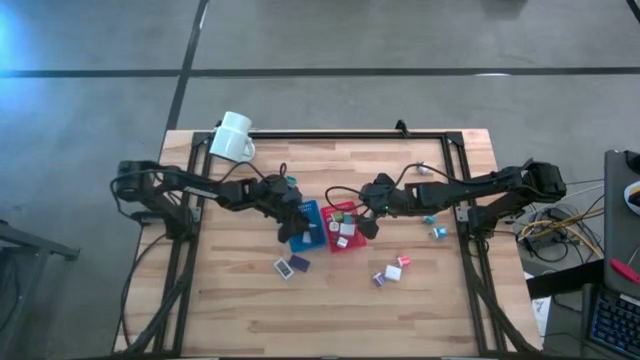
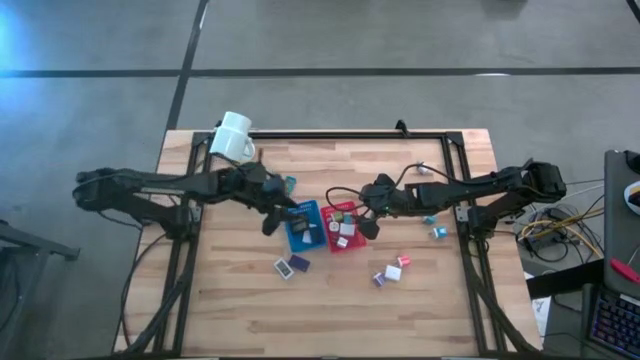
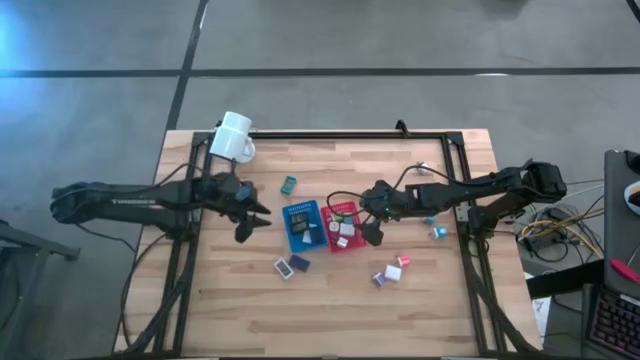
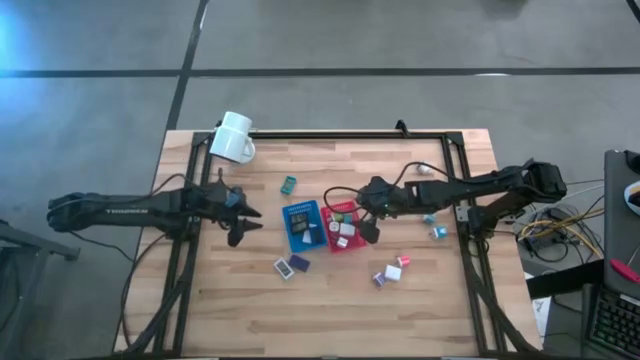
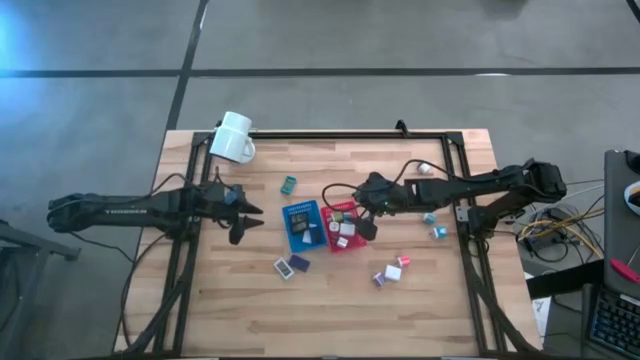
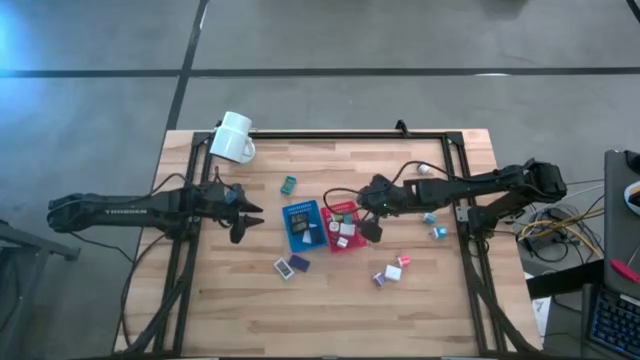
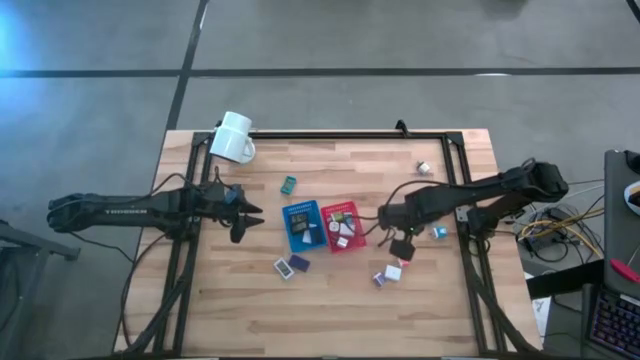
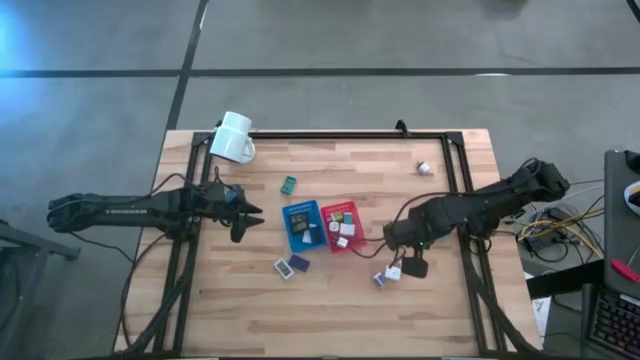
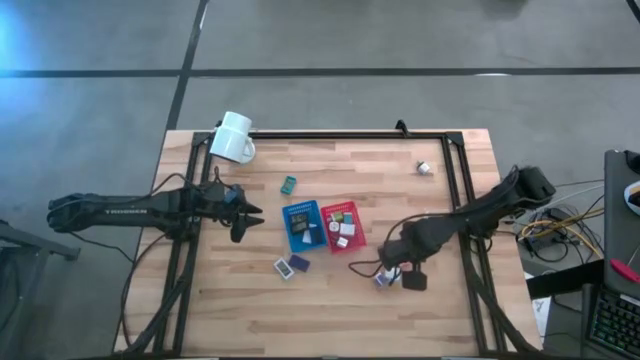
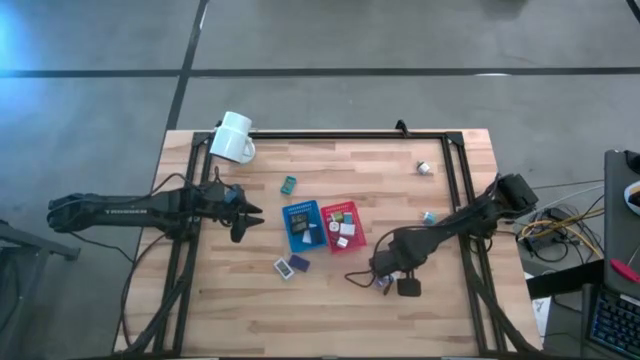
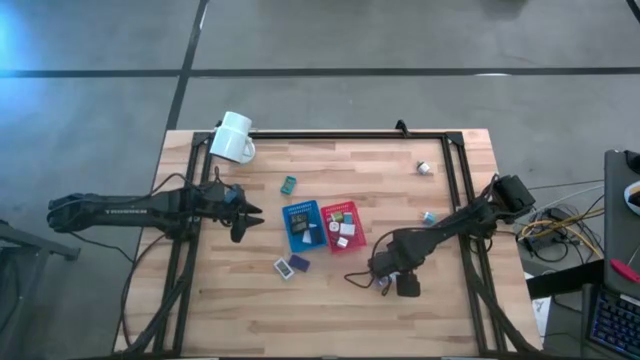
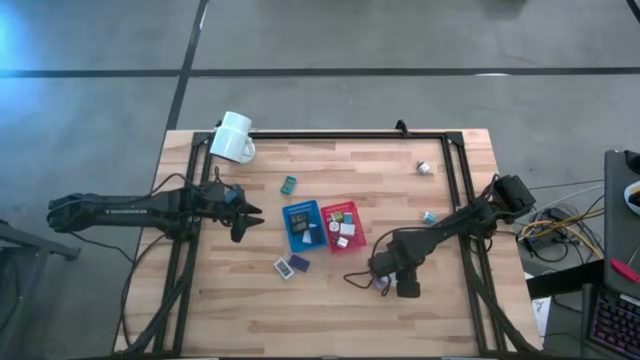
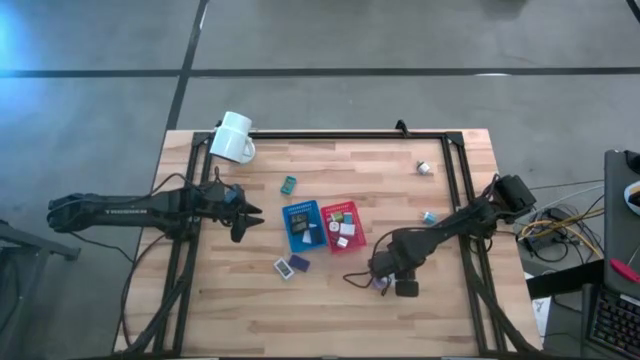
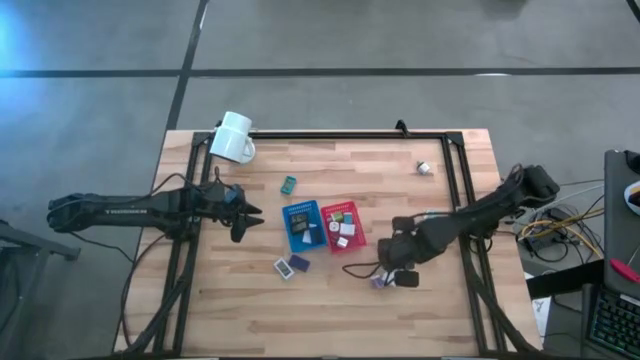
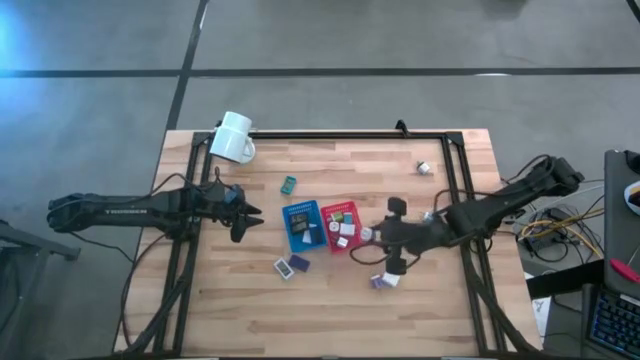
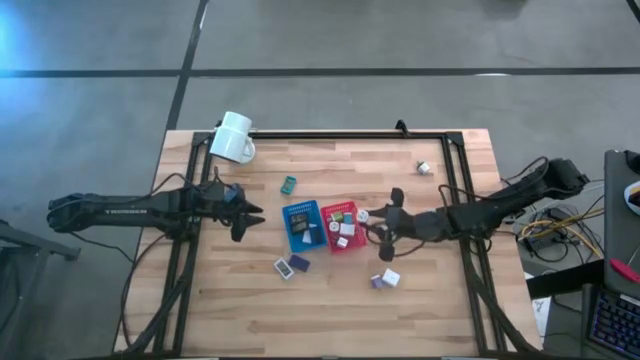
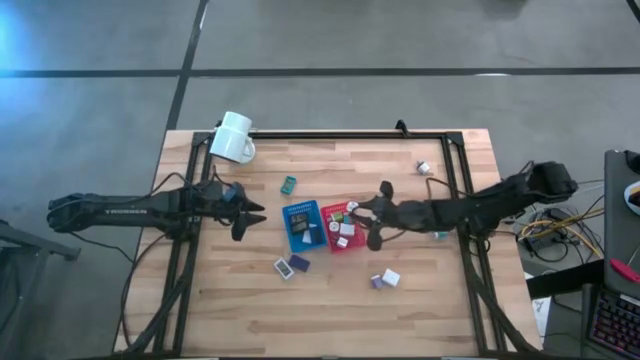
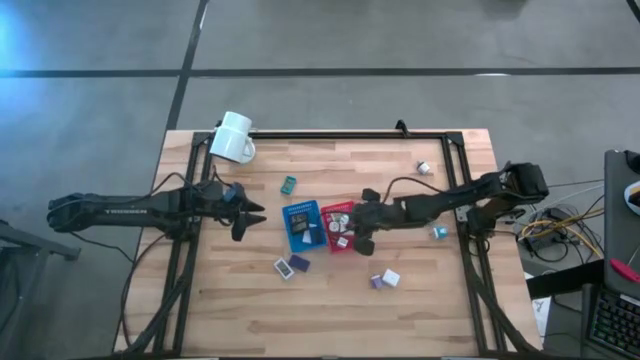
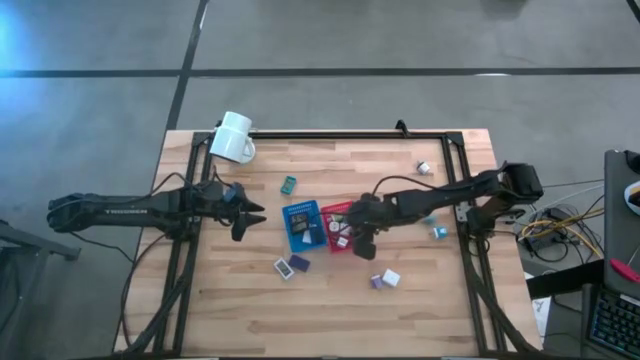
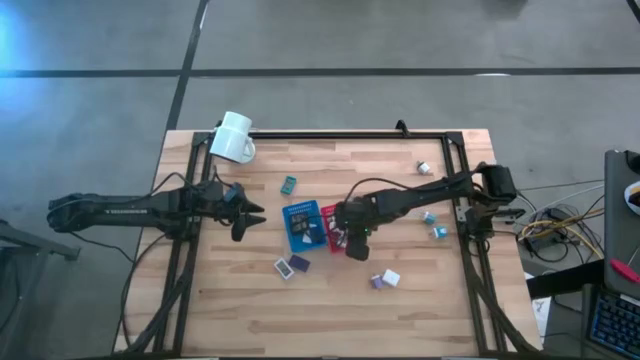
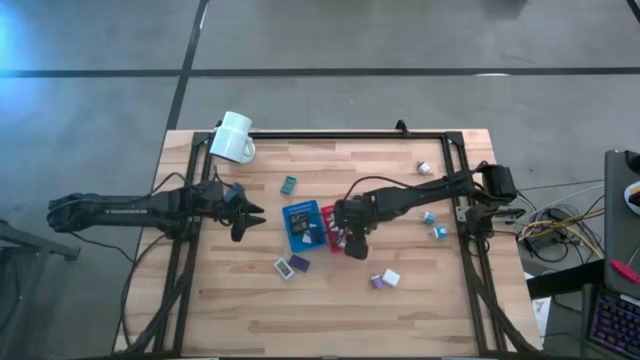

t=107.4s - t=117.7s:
Task: Pick & Place Office items
Put the pink charger adapter into the red bin

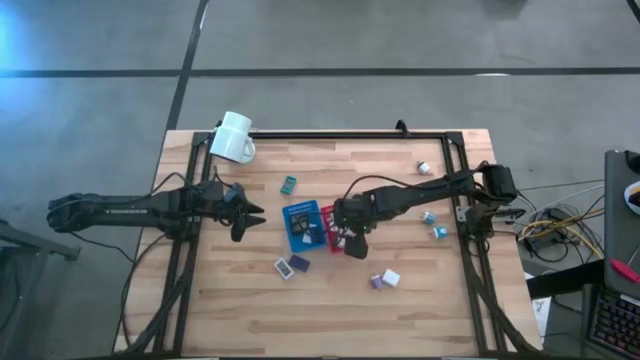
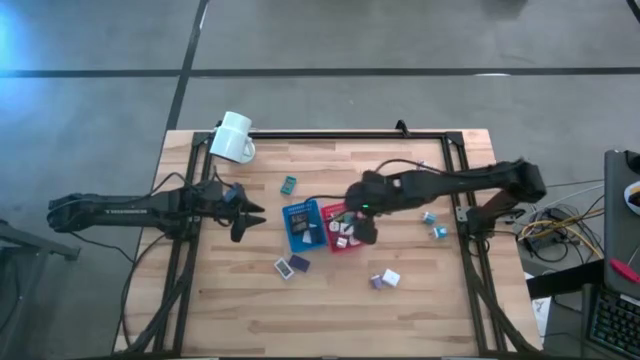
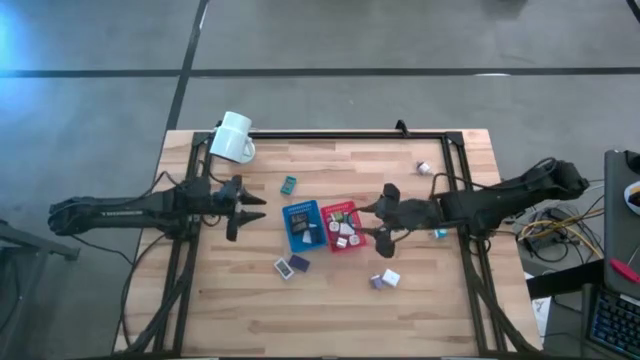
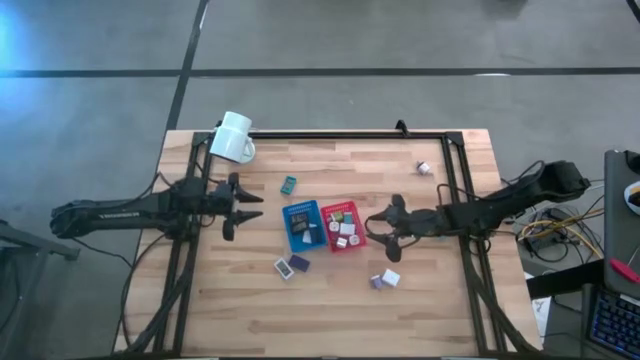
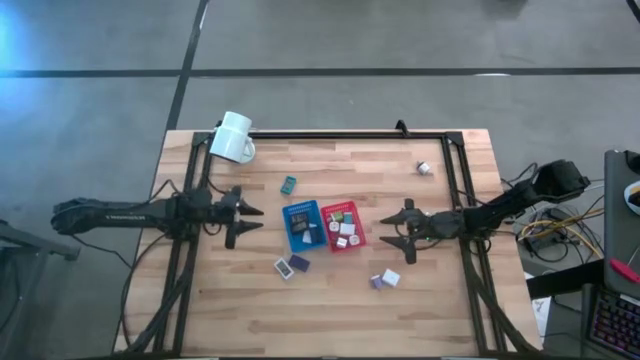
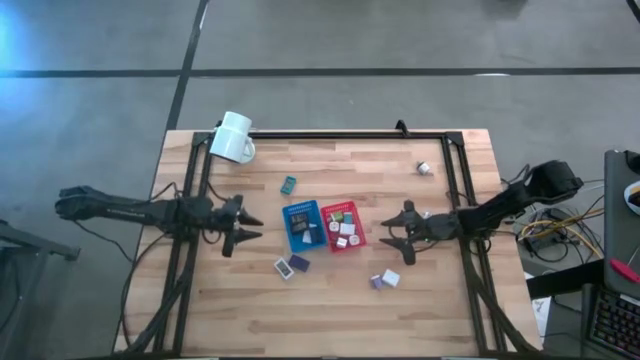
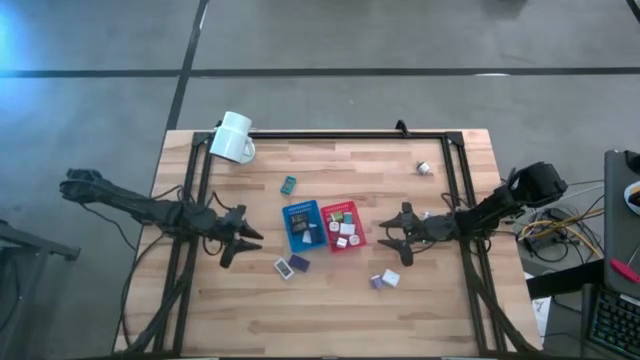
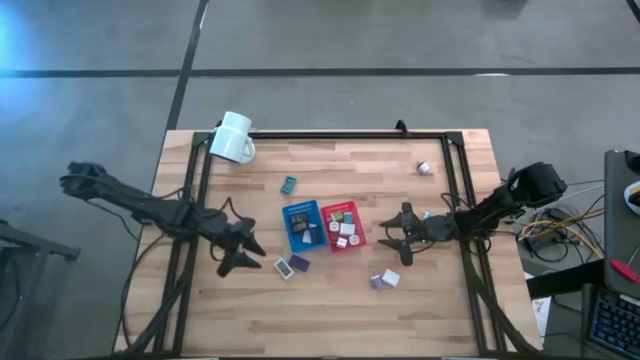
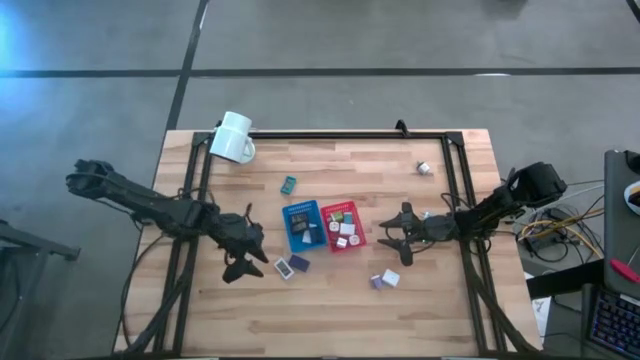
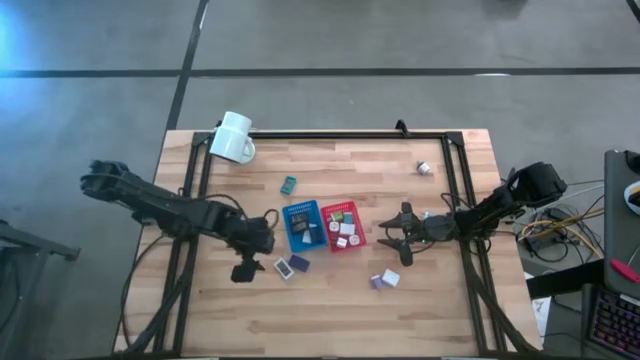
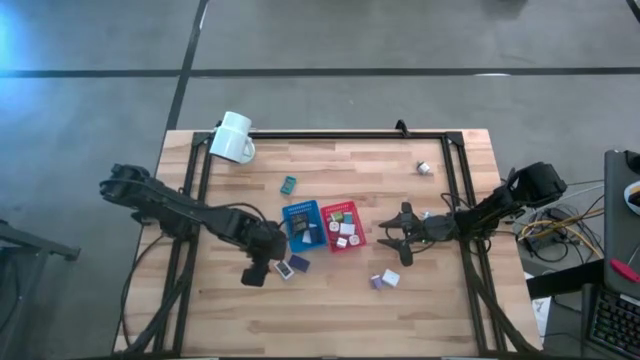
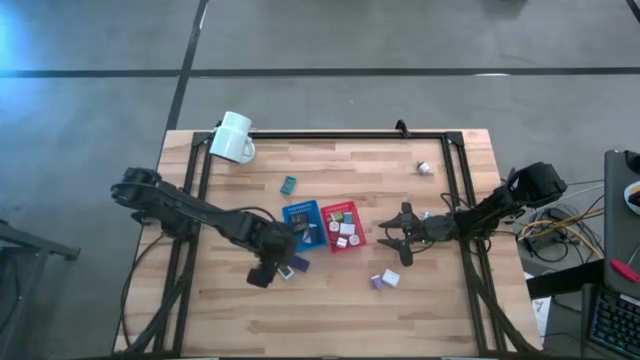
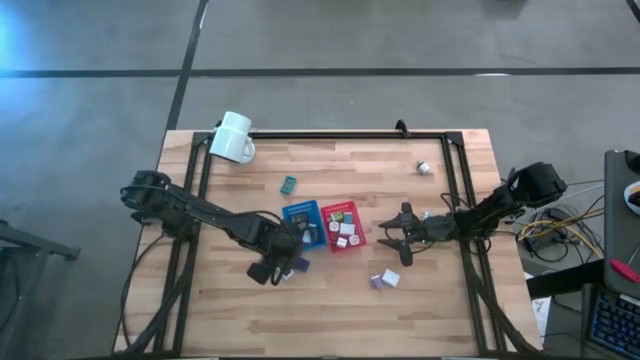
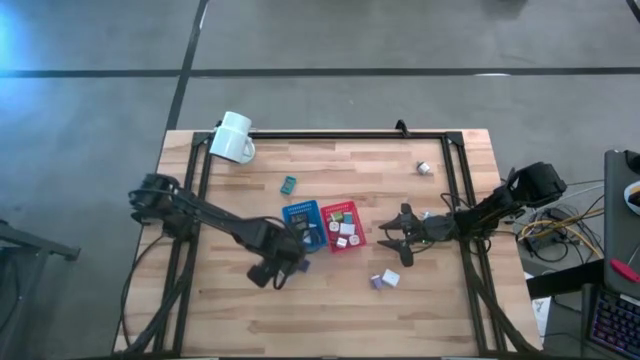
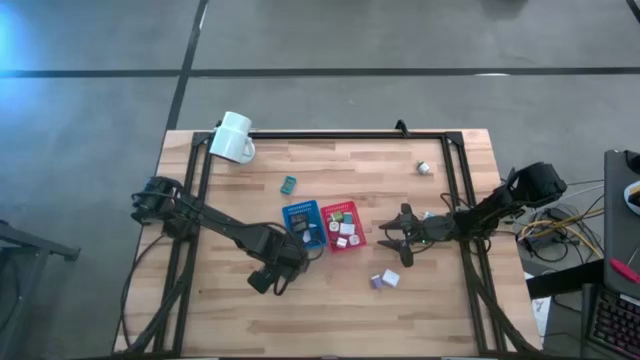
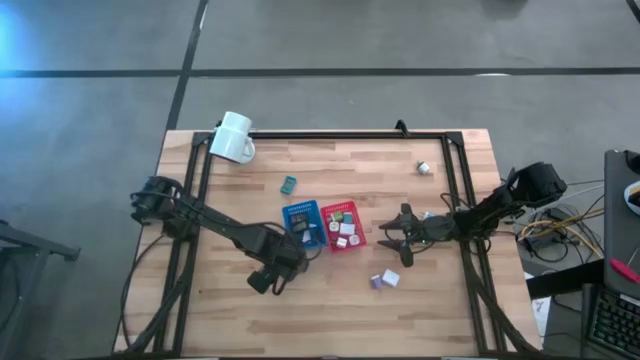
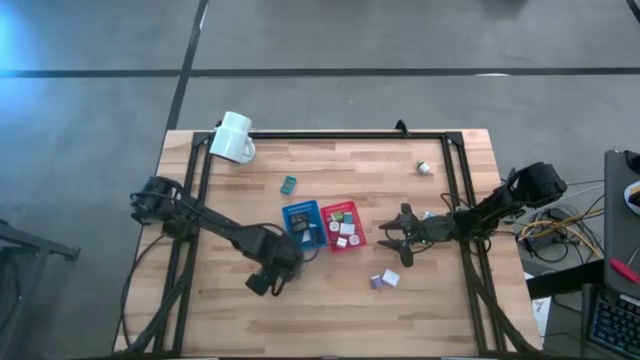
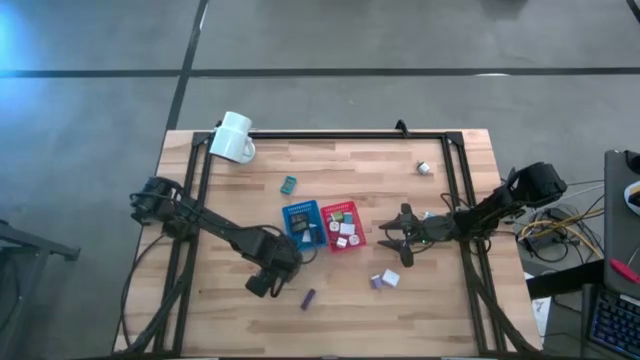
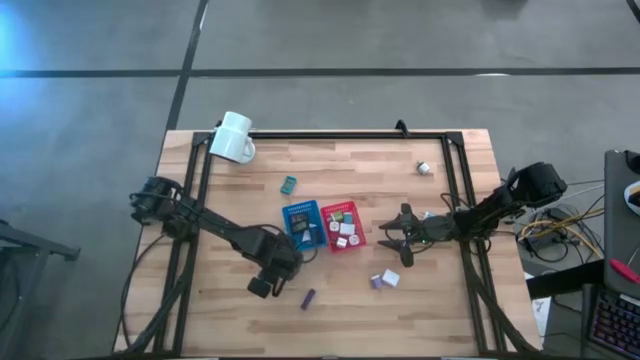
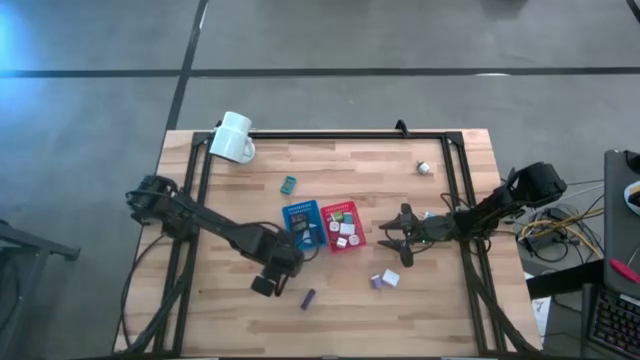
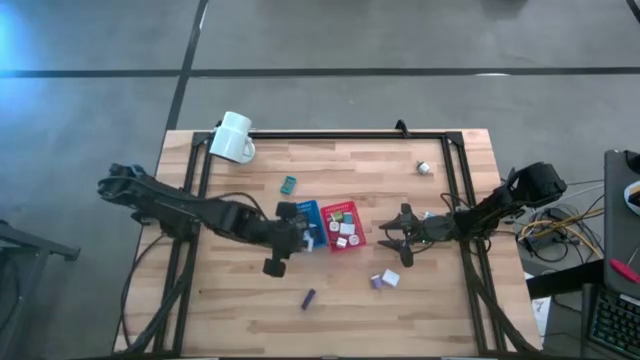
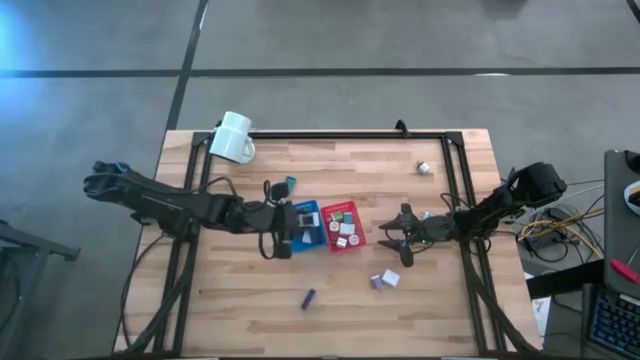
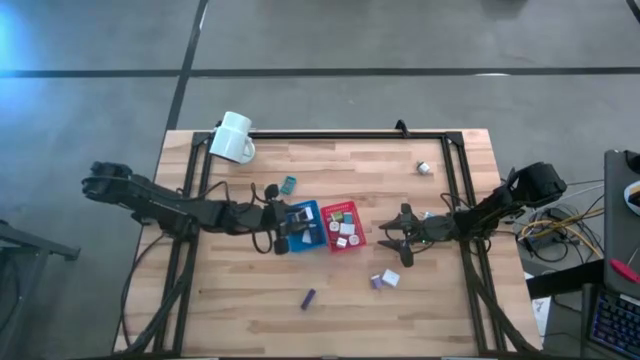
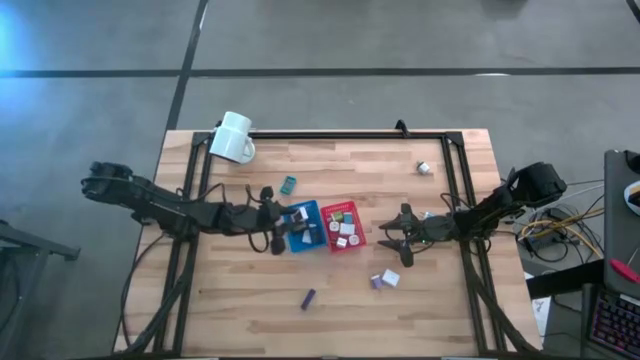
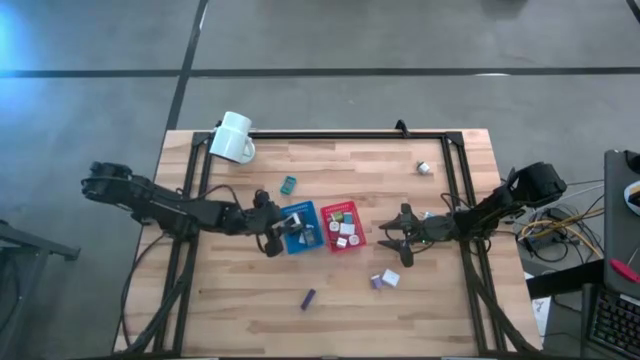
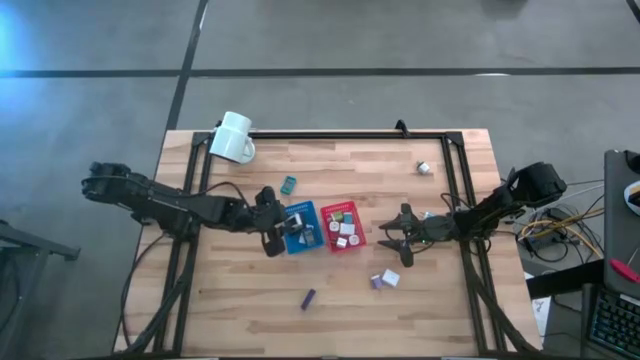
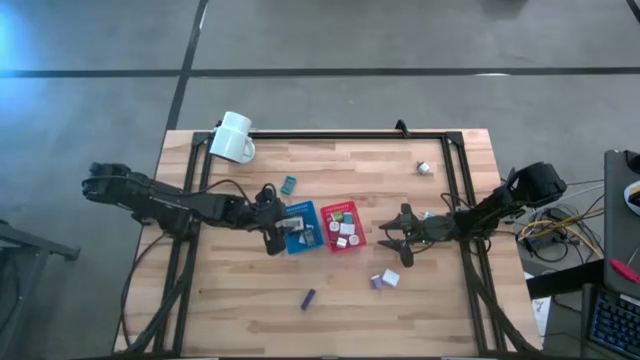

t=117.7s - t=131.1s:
Put the white digital clock into the blue bin
